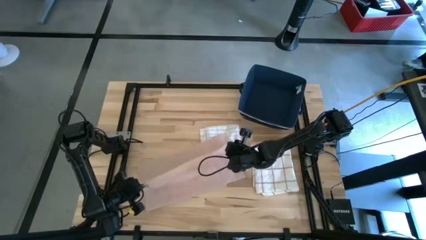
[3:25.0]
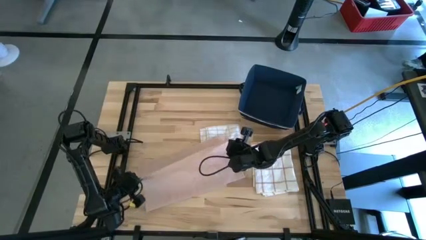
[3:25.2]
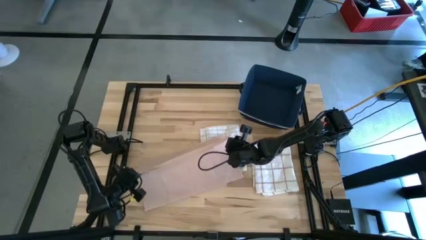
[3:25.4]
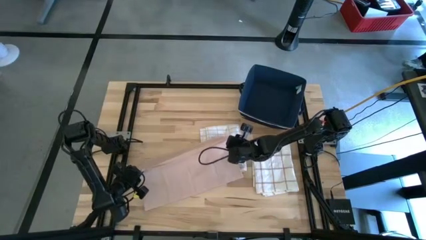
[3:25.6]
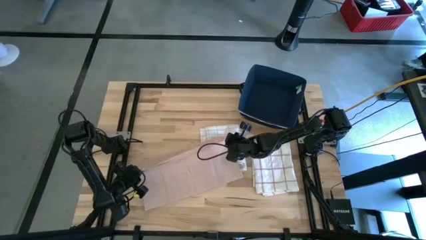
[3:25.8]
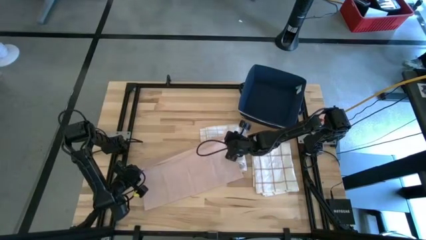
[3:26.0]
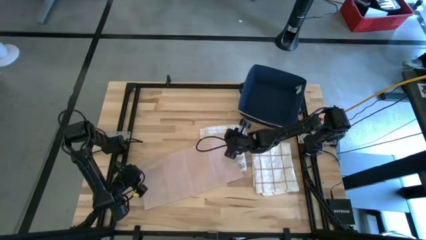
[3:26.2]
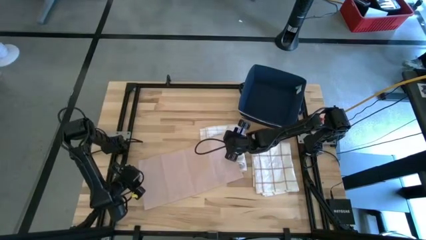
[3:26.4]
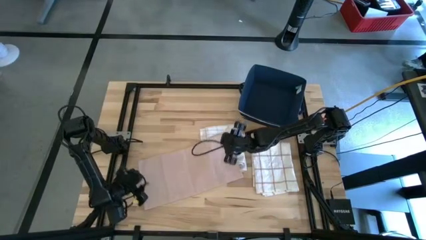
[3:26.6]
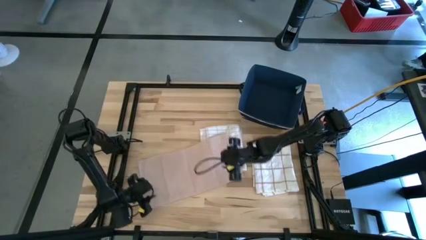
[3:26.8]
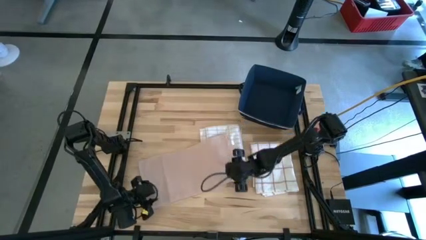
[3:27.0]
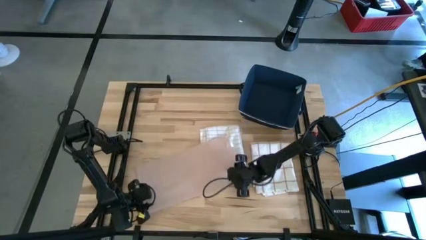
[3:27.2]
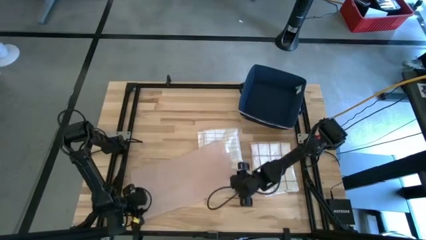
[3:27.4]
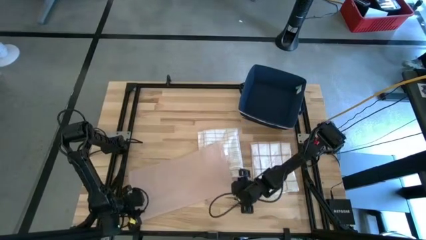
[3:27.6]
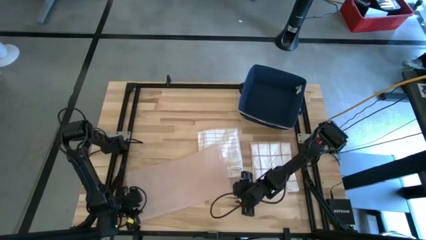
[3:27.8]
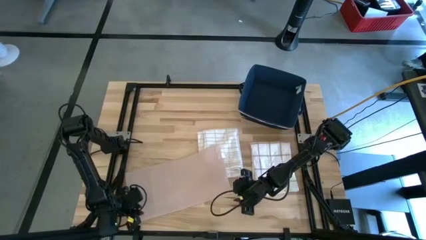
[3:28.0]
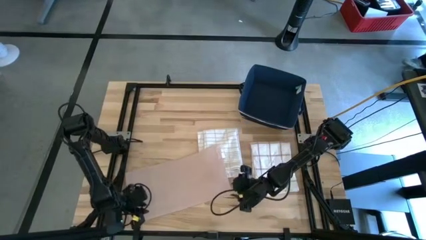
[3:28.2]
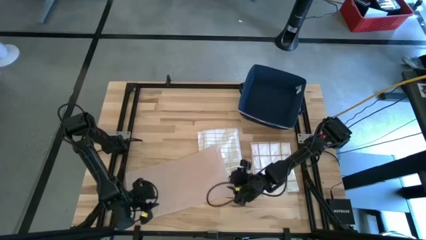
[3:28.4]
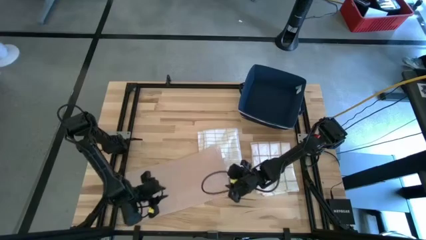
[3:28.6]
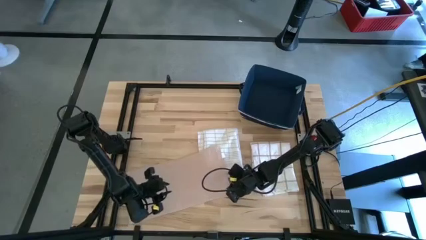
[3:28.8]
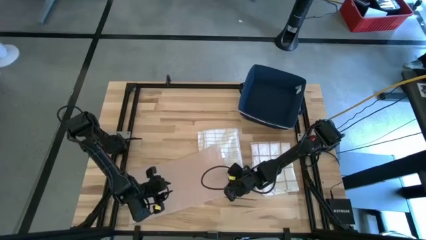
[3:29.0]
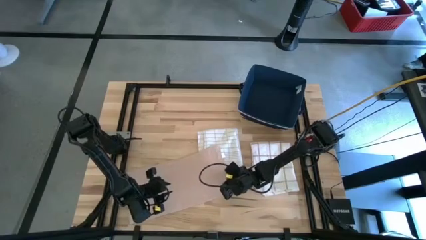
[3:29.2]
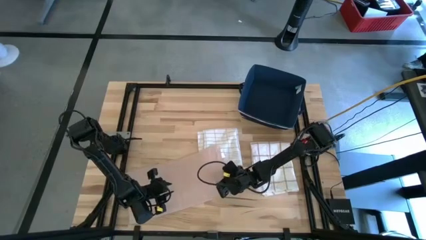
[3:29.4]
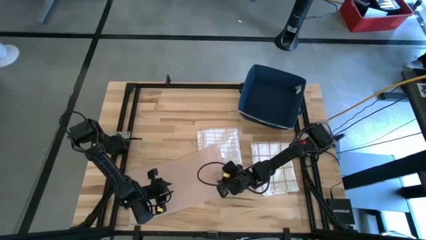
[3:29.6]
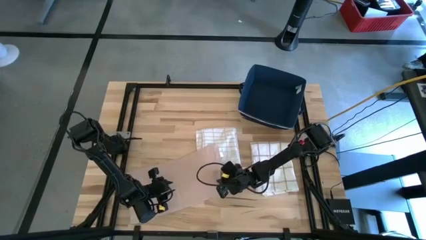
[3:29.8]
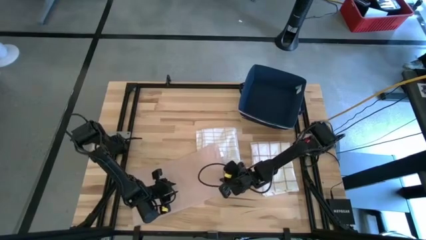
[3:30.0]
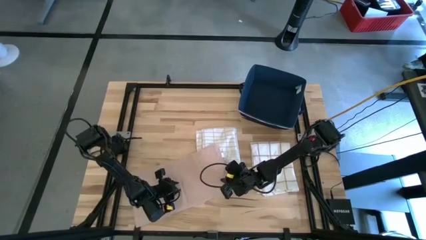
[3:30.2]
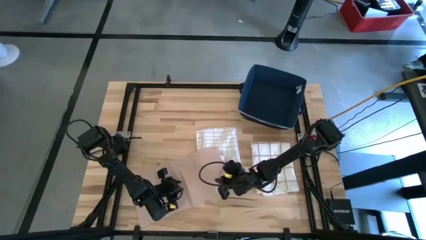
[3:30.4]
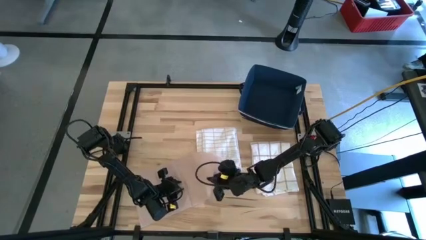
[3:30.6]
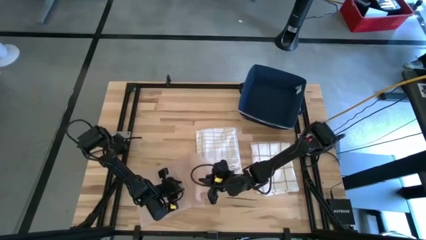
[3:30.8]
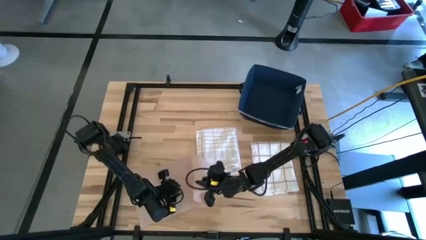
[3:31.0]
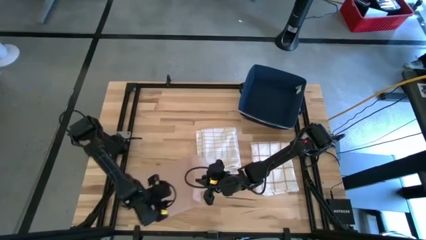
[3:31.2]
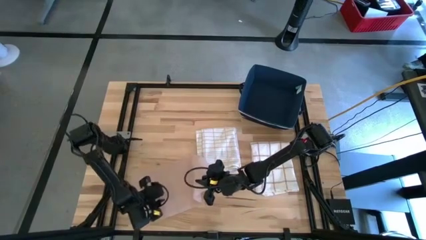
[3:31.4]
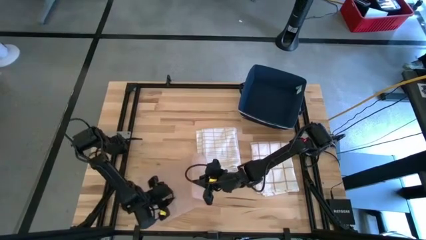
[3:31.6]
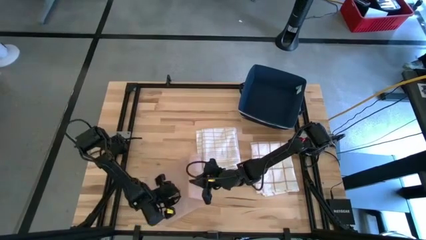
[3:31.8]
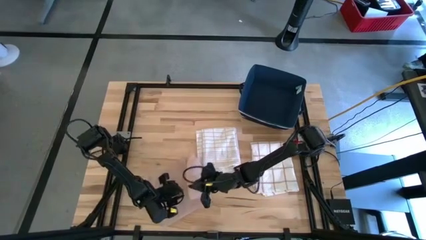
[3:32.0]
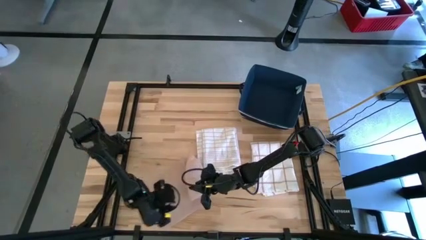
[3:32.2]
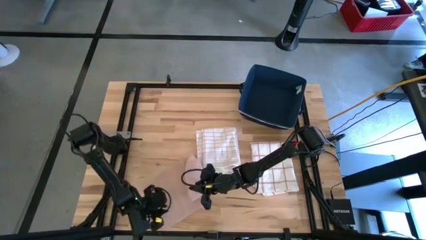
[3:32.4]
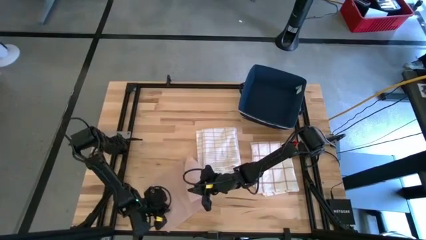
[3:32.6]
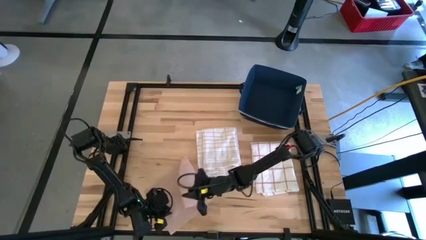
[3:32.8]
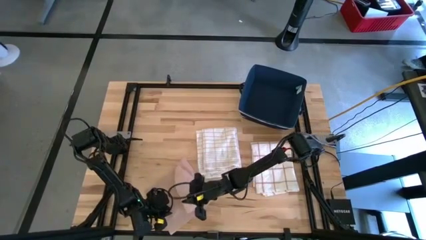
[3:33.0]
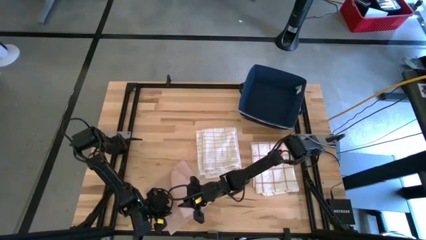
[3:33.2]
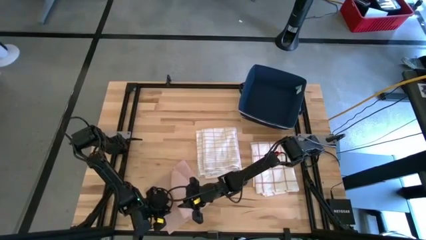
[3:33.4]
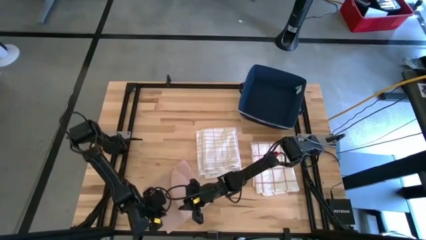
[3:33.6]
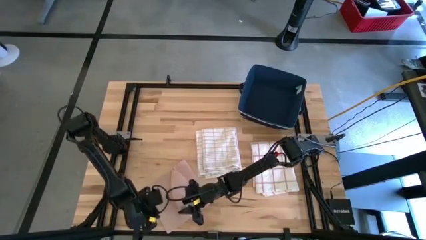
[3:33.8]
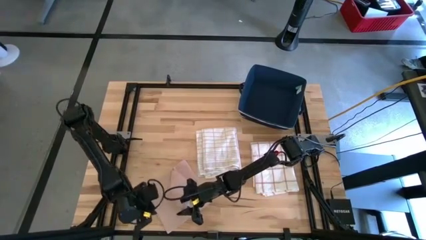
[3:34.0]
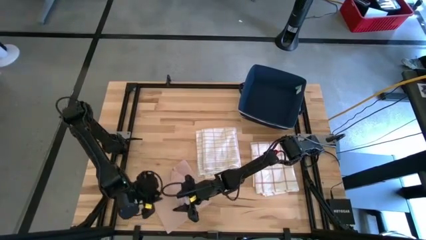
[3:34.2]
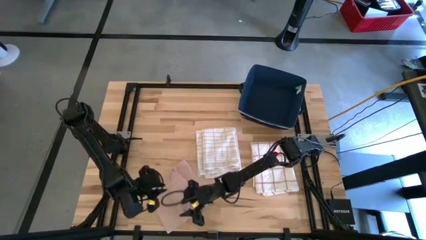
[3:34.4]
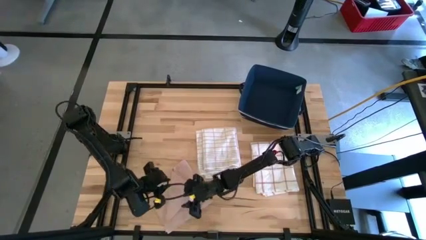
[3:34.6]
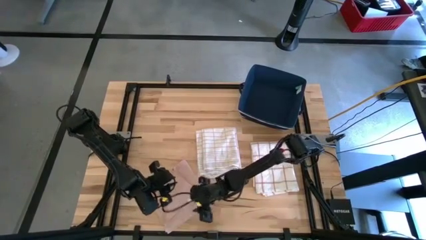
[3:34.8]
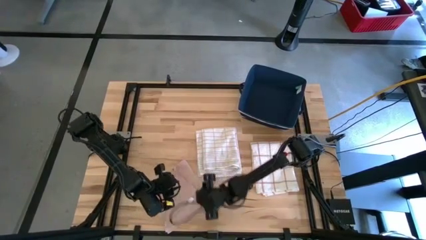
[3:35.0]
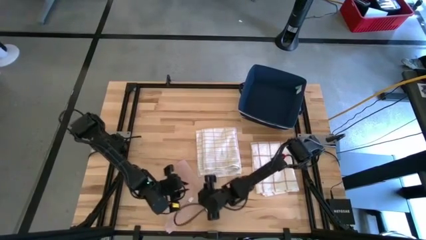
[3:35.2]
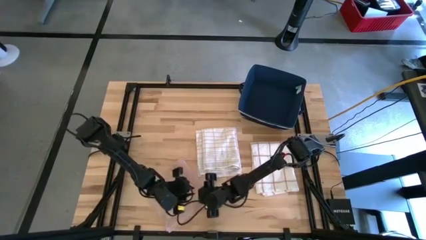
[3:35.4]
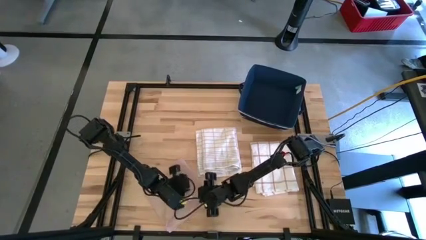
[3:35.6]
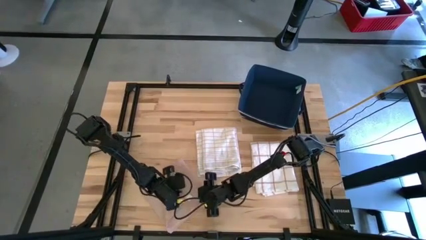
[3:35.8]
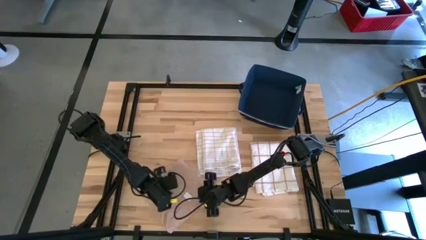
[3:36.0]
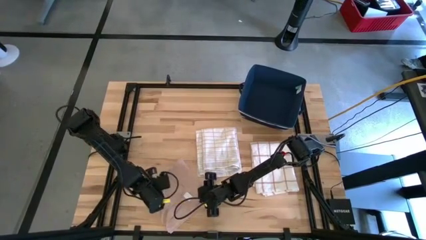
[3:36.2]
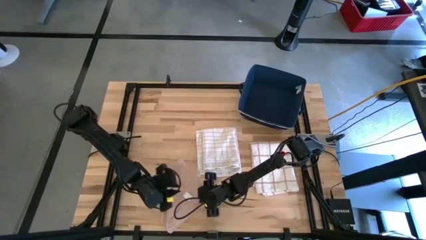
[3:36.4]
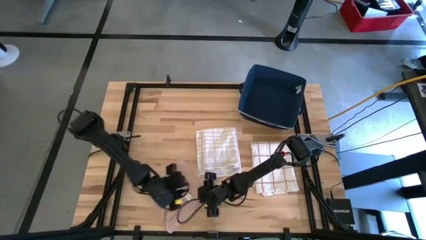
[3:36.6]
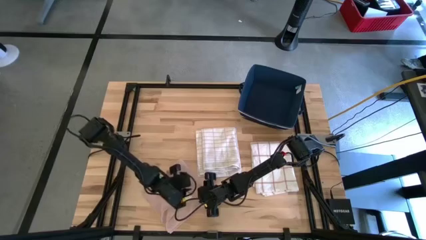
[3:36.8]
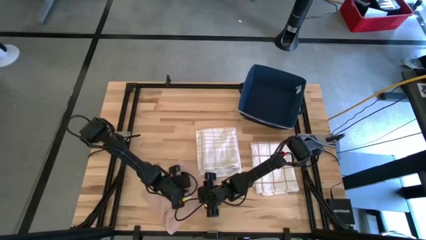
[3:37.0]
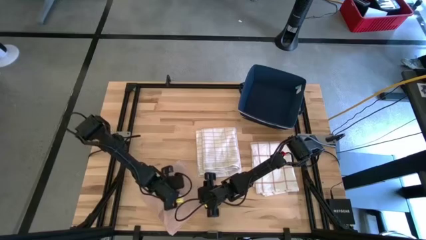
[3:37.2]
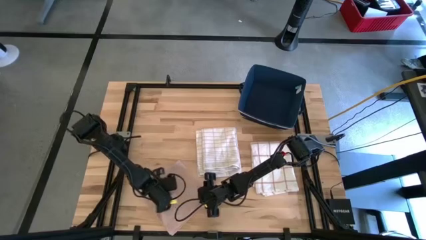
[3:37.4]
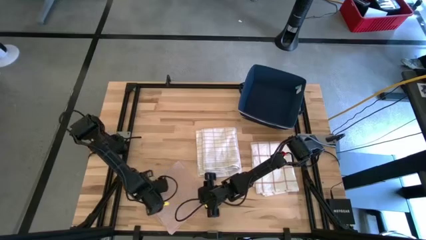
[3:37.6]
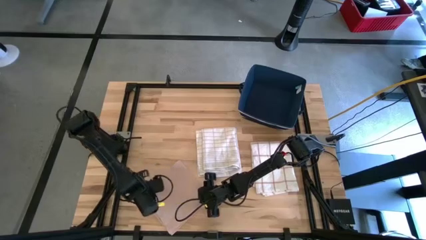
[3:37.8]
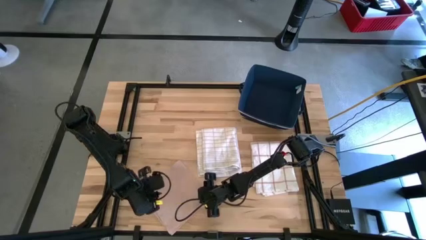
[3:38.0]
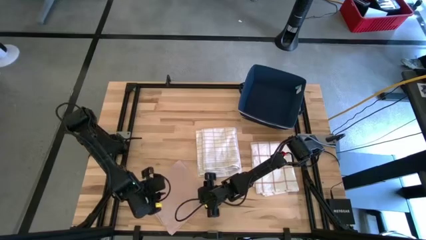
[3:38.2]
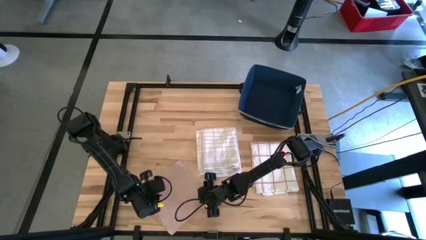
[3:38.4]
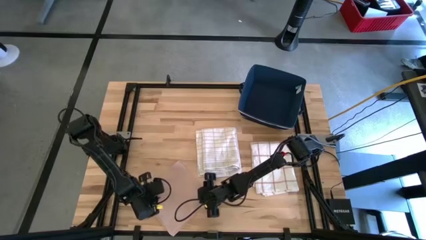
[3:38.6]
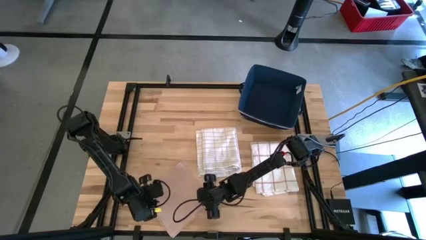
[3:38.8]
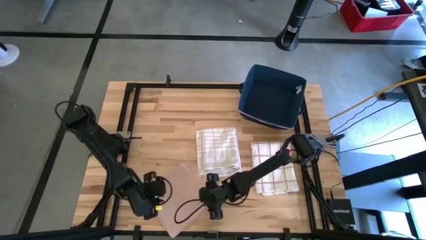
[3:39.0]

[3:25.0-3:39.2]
Task: Fold towel
Fold the light pink towel

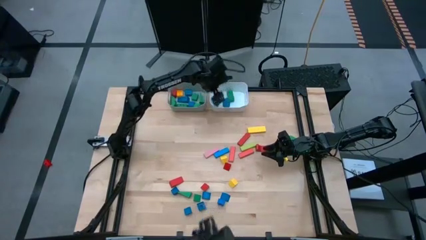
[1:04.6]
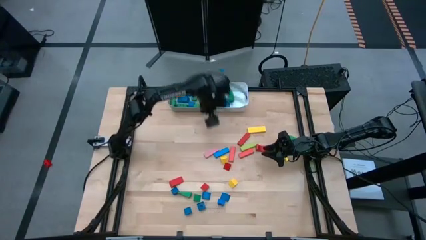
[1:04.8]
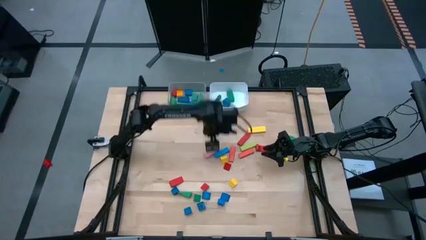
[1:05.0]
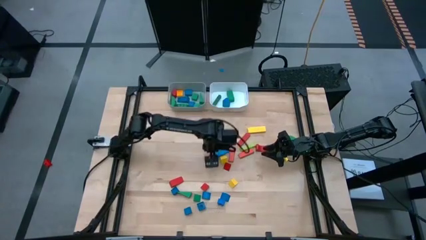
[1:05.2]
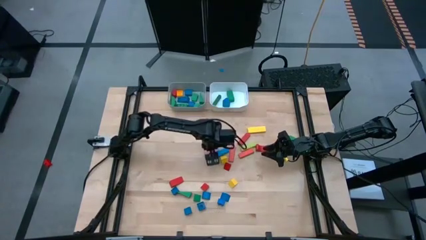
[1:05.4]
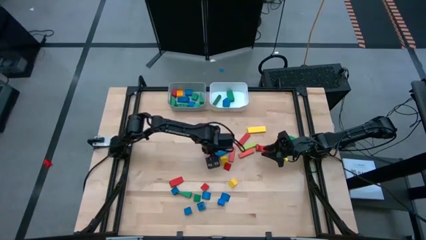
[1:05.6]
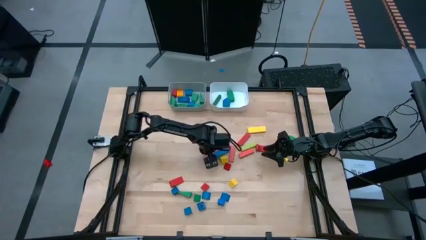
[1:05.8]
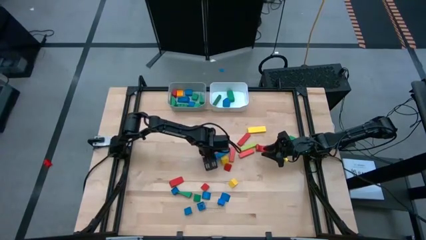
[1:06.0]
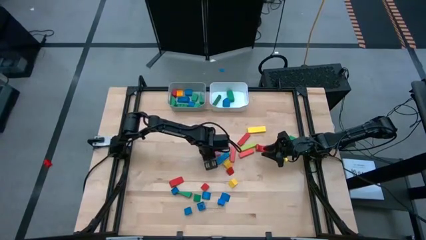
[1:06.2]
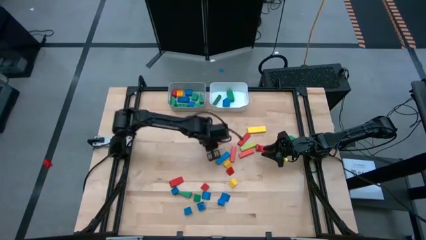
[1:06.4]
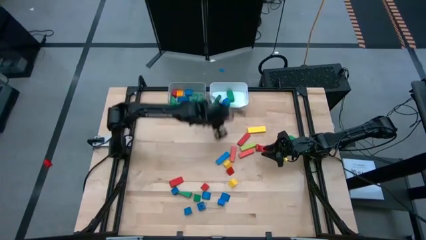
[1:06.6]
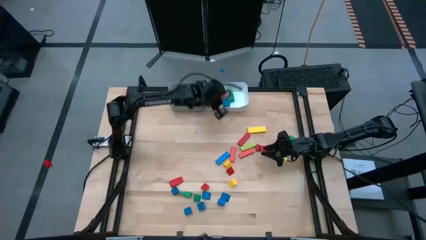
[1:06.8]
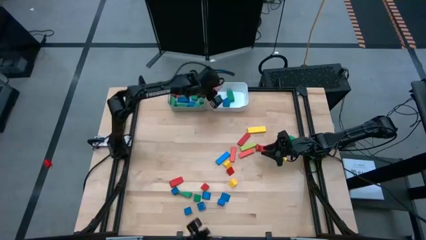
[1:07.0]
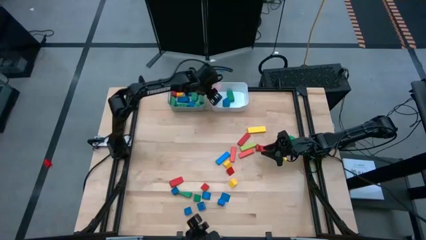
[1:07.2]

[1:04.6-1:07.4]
Task: Sort blocks by size
Put the pink rectangular block into the white bin
